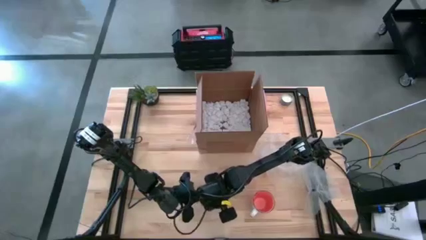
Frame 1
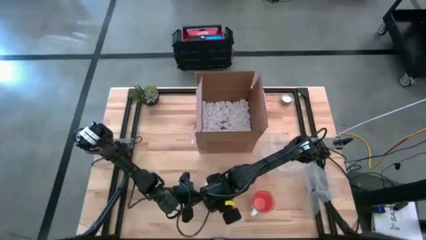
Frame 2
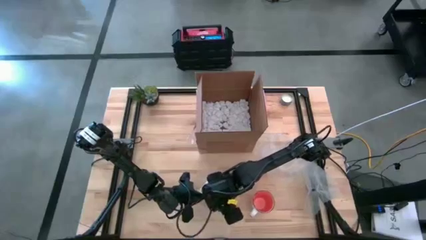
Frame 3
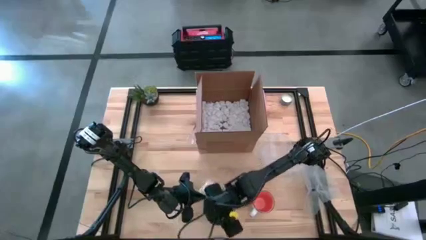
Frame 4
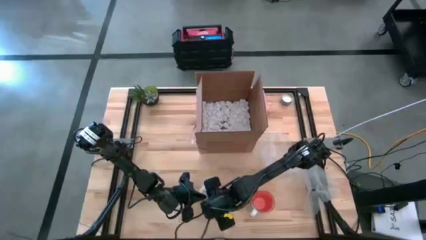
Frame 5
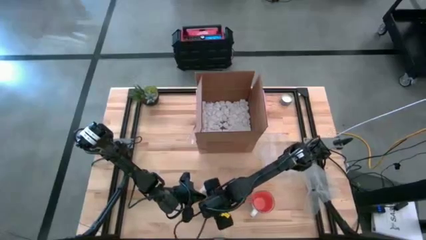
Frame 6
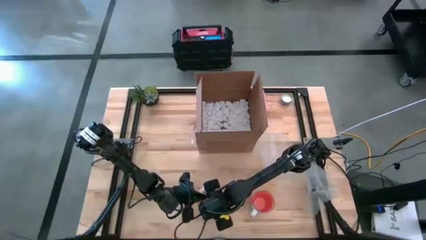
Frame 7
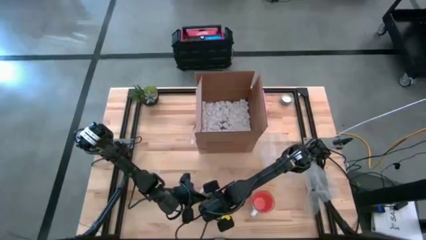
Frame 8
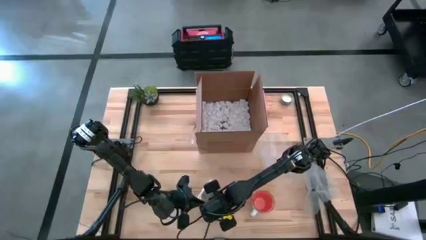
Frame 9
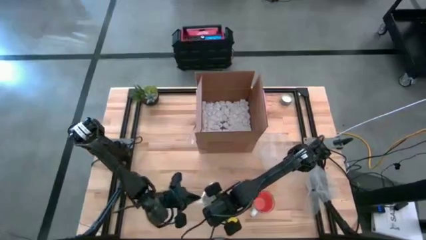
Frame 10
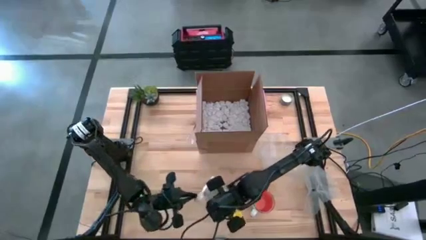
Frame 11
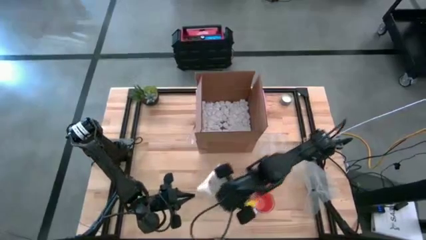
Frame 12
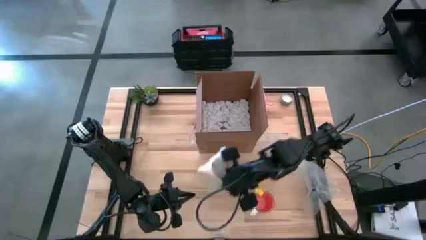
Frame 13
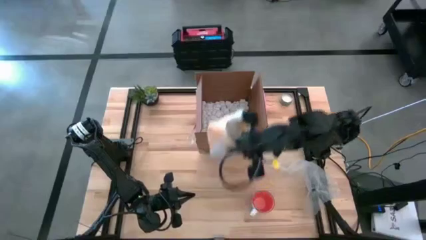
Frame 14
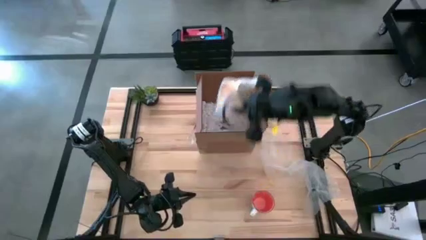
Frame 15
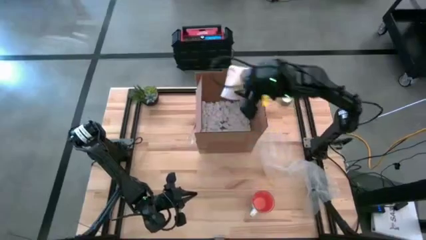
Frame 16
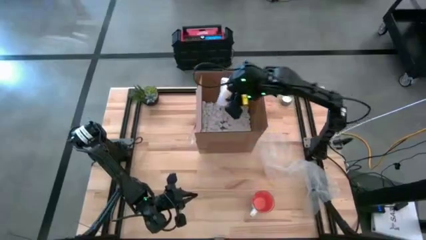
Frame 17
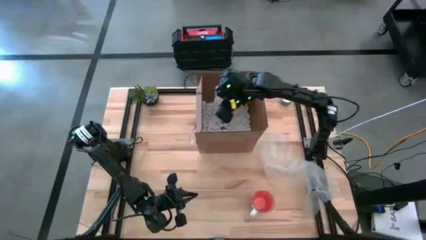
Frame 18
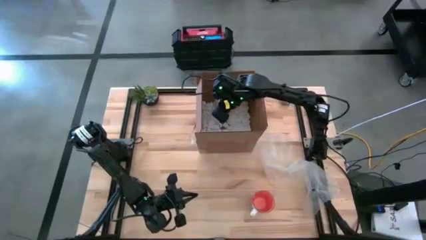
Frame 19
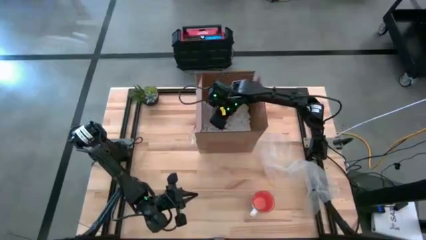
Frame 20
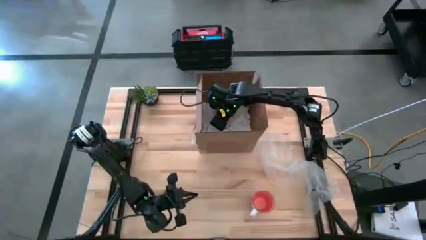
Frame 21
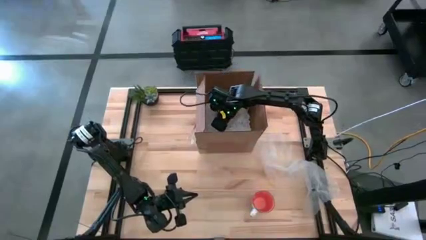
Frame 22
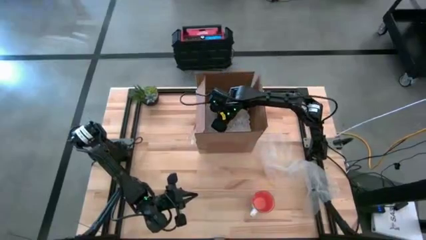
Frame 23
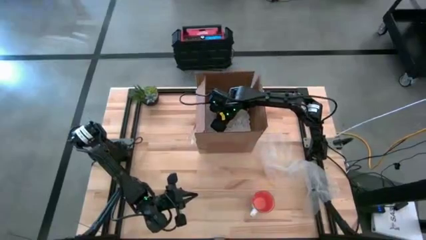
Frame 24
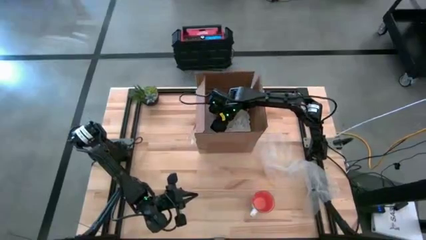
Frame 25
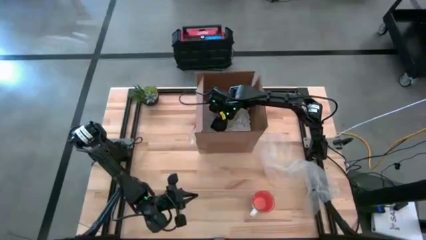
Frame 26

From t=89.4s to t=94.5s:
Task: wrap mug
Put the wrapped yellow mug into the cardboard box

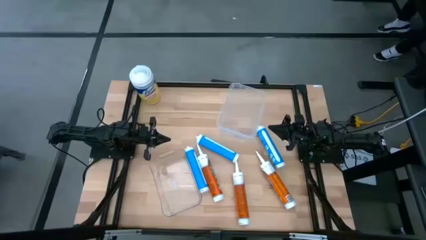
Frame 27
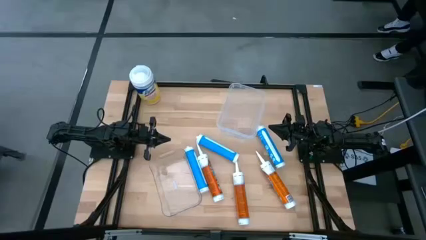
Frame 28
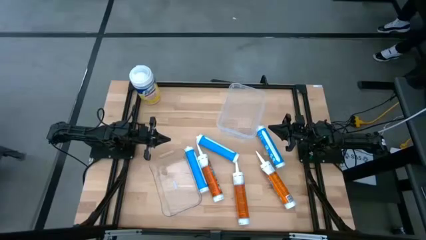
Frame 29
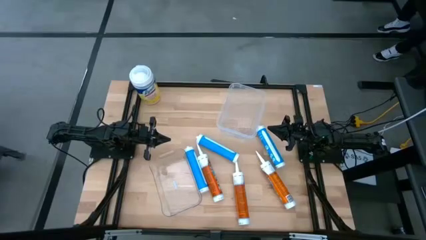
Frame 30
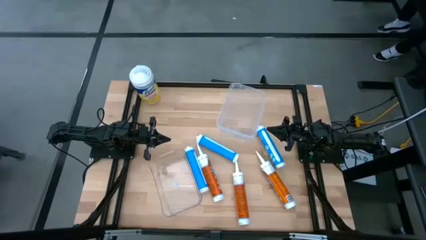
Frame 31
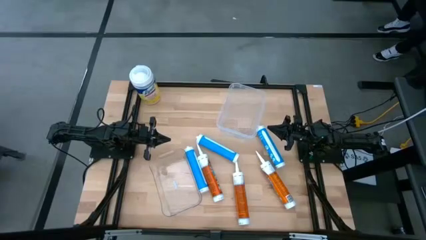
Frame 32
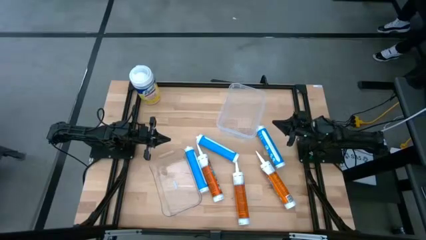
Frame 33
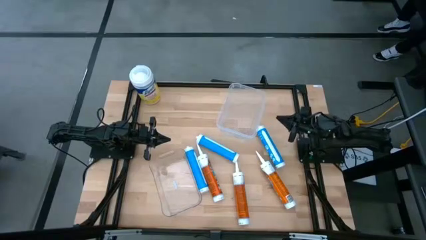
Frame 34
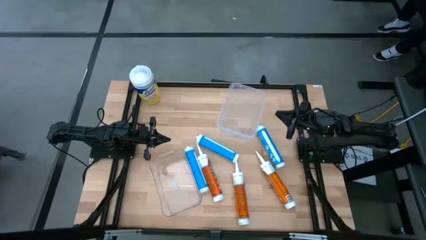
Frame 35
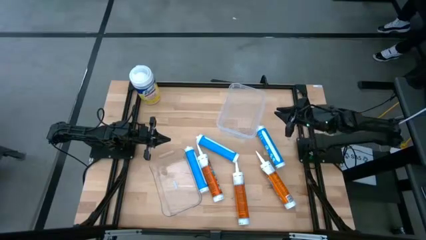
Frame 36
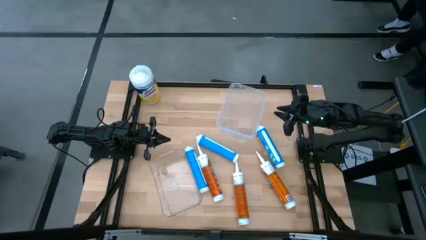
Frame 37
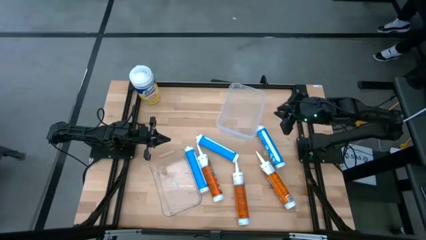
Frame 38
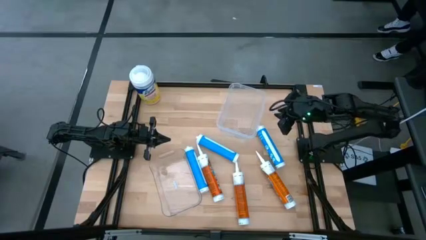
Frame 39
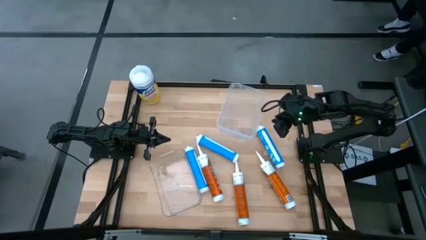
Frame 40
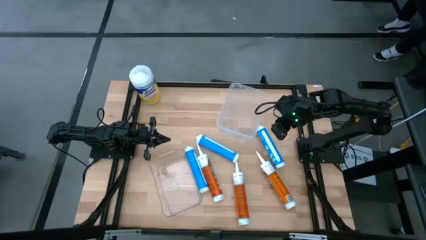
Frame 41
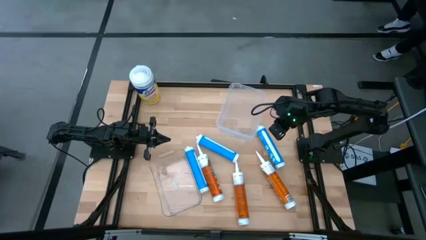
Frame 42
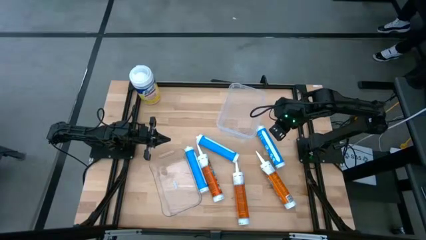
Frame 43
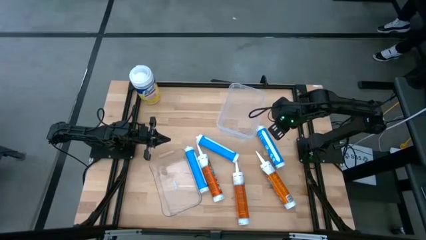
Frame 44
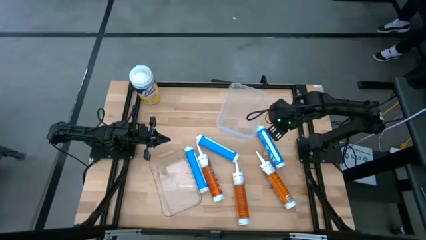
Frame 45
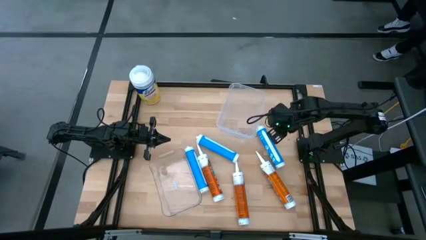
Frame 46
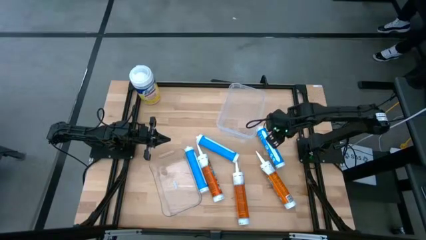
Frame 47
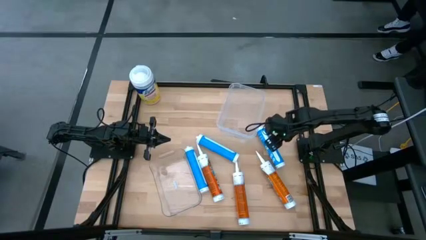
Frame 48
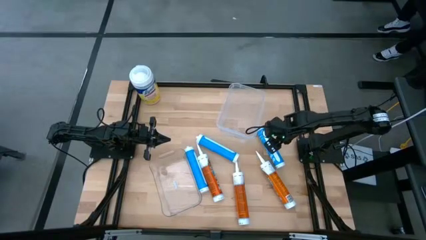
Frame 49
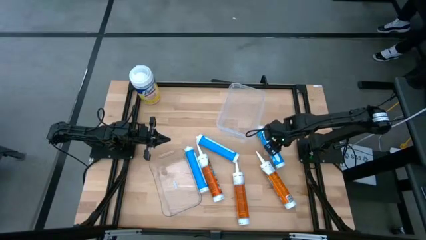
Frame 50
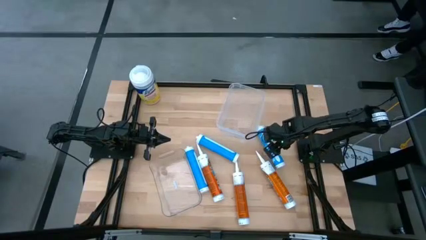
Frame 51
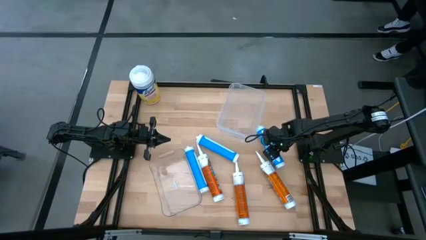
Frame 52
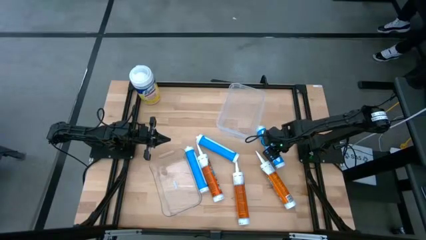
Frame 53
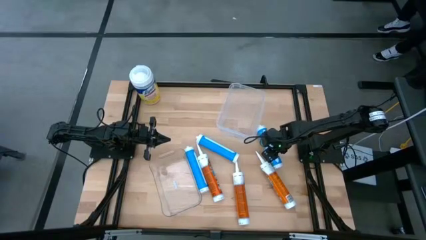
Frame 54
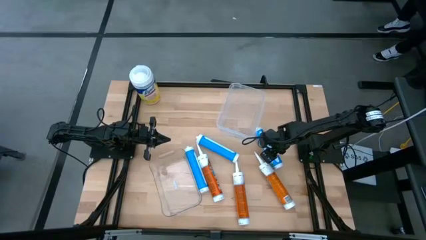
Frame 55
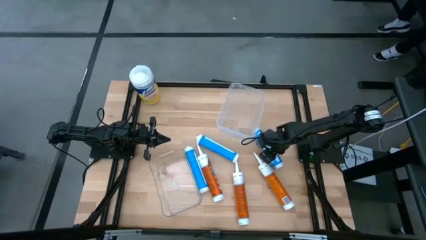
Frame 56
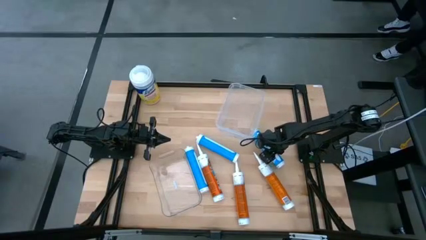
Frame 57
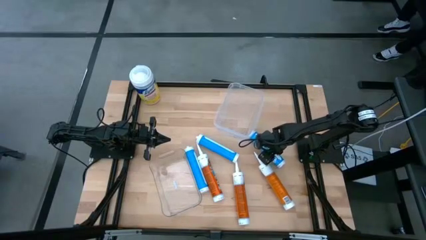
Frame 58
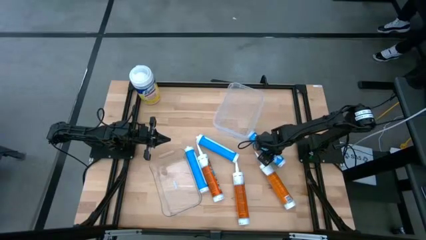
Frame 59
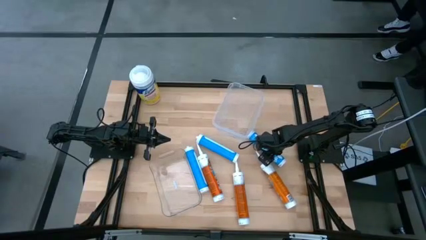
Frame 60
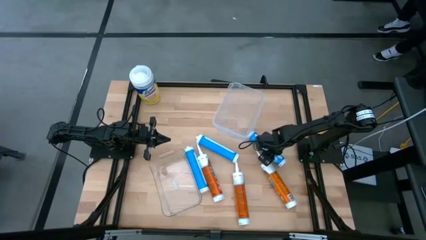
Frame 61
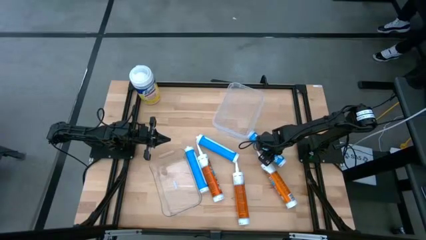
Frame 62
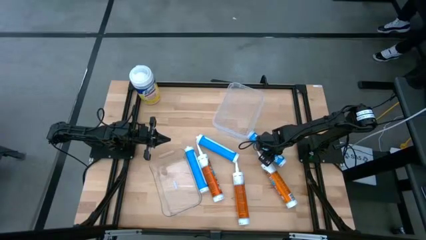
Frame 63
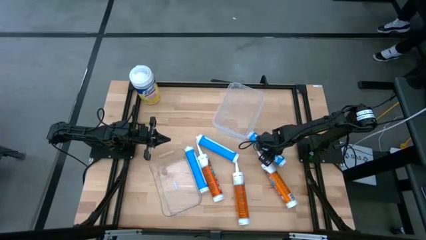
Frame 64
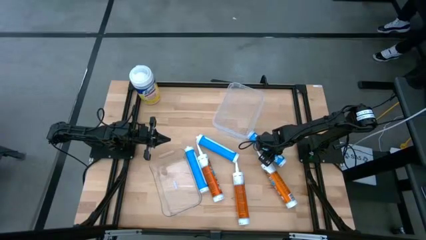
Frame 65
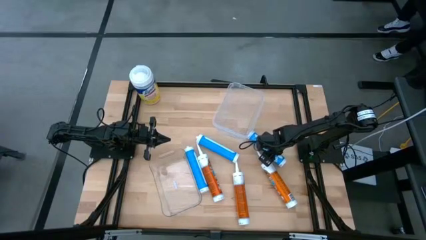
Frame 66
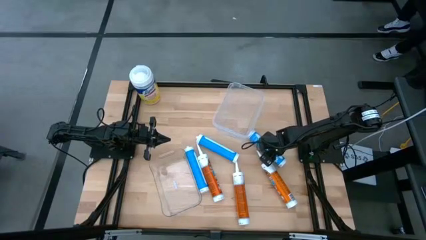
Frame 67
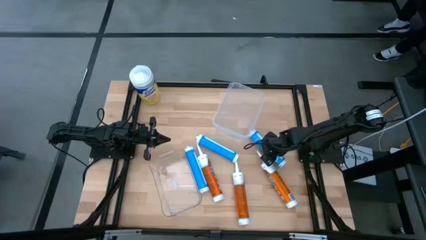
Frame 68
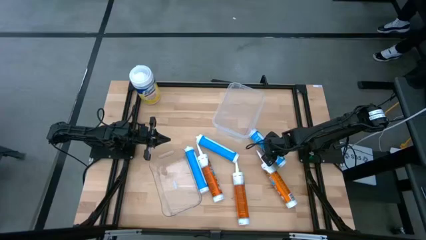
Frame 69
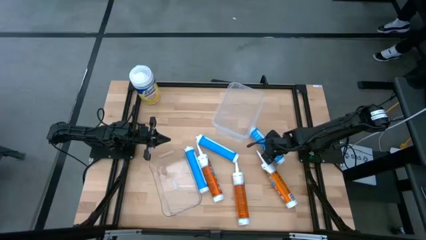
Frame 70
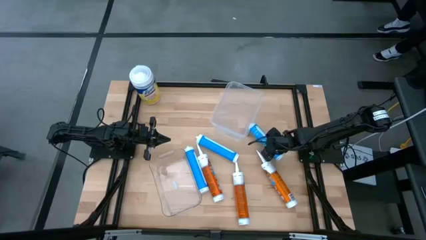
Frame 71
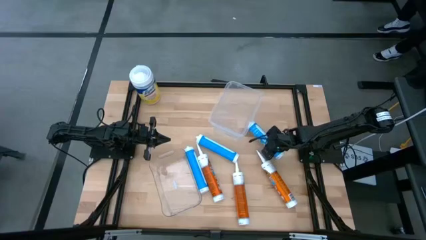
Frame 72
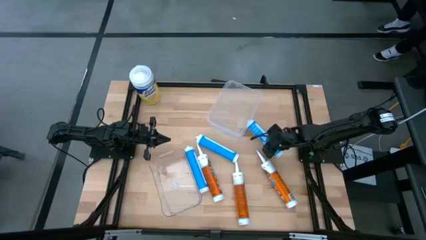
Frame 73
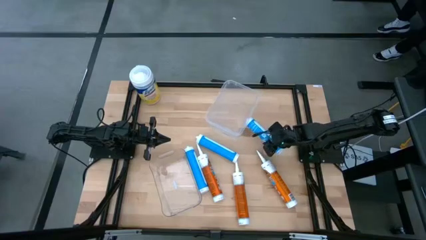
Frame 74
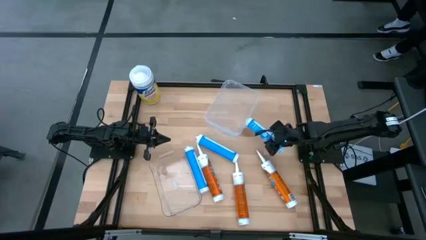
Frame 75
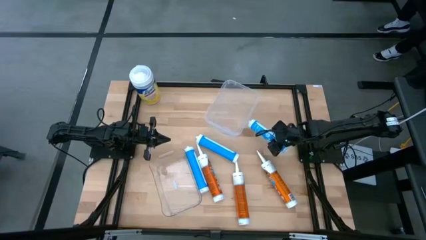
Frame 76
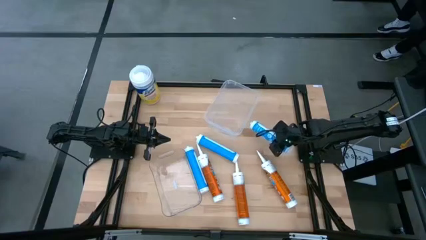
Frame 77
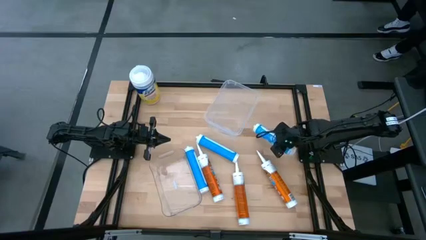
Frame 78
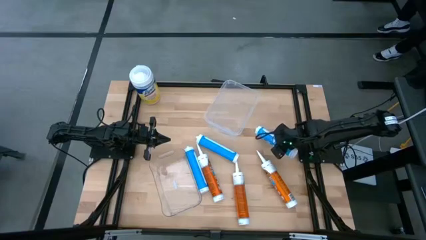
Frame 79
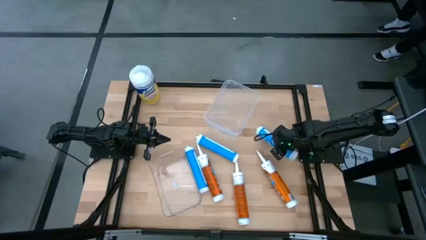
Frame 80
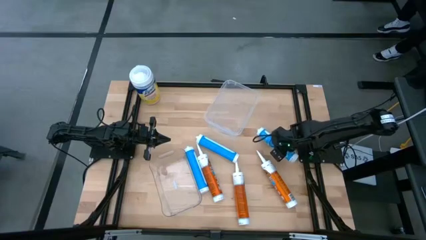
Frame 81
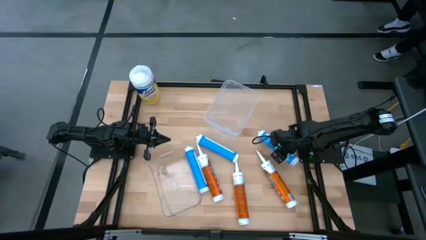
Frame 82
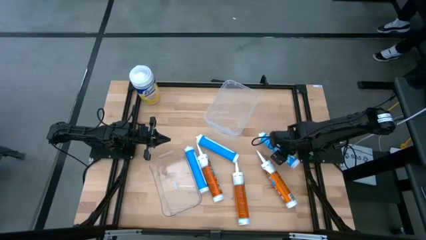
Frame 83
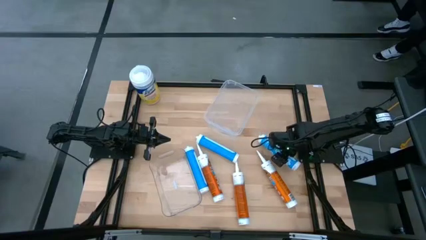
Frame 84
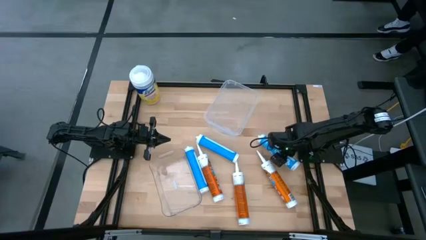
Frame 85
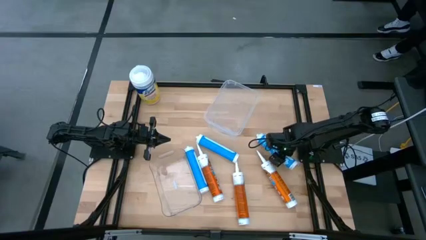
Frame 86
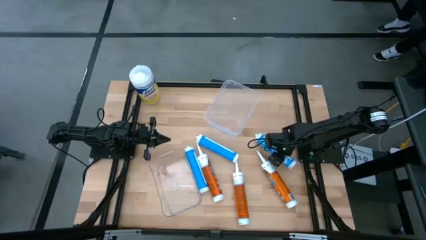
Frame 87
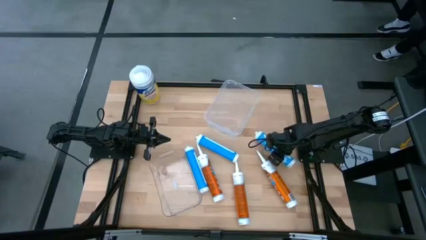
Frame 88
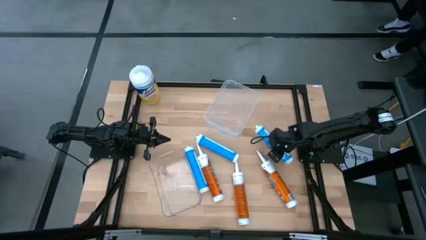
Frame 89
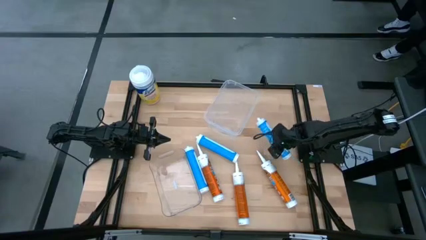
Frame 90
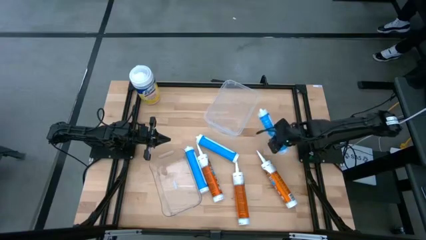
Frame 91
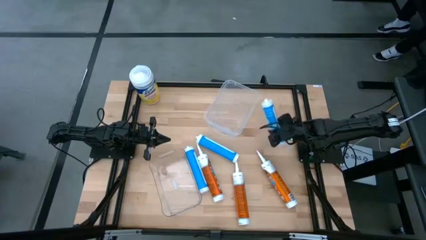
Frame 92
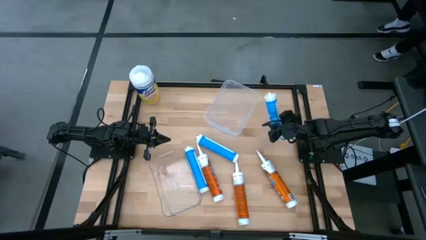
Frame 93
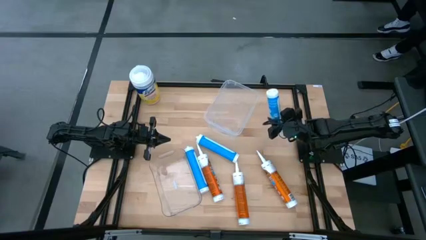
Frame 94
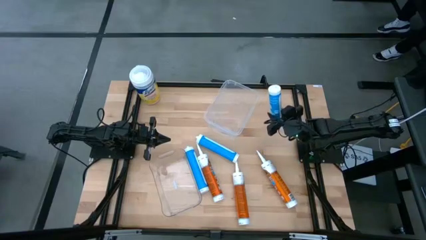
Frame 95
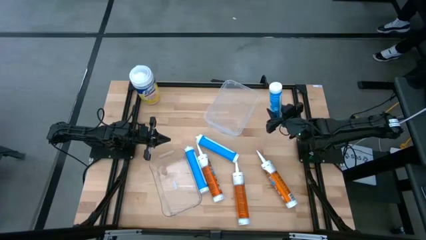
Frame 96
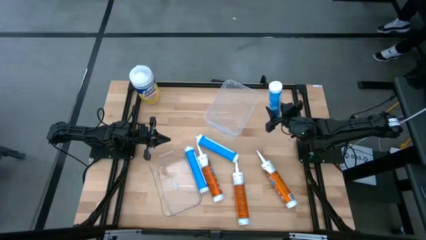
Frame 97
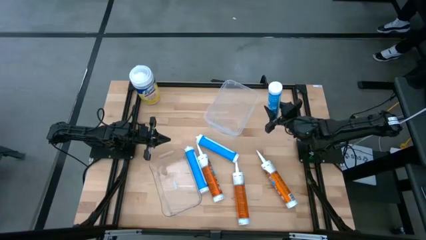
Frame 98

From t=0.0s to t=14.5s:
Task: Pick & place silicon tubes, Sealant and Lysol wipes
Put the top right blue sealant into the white bin
